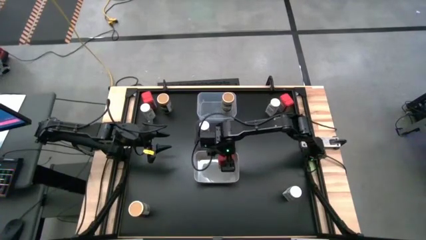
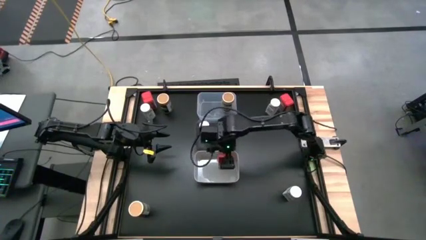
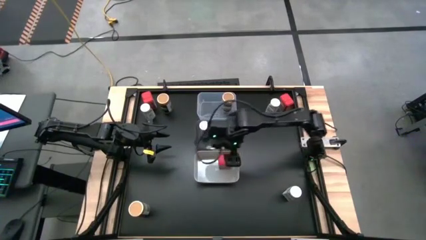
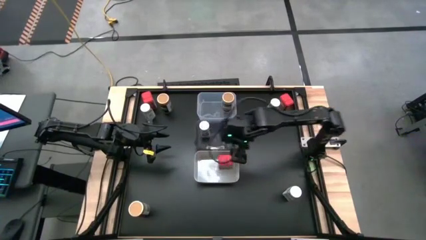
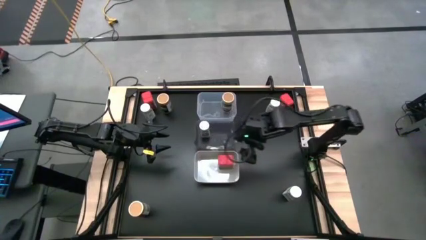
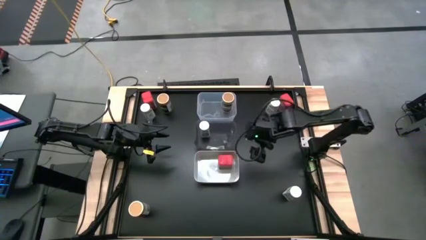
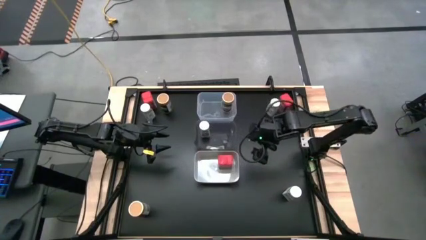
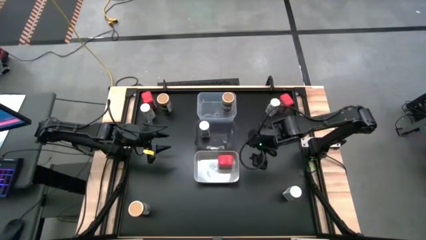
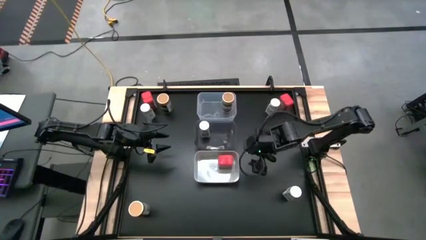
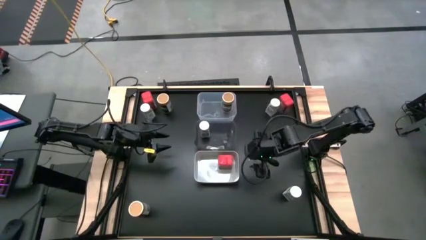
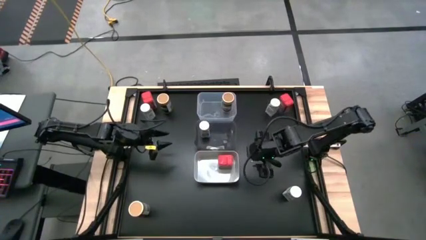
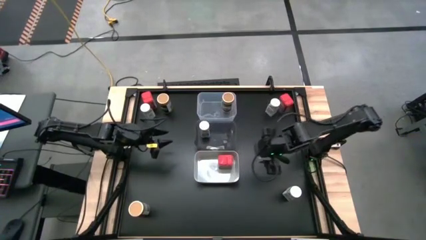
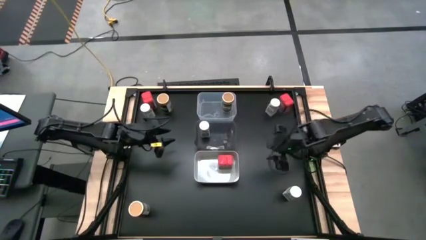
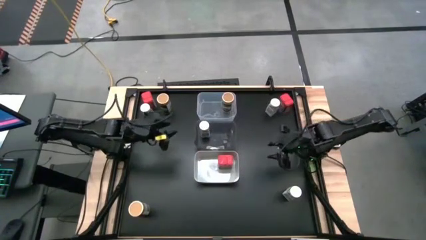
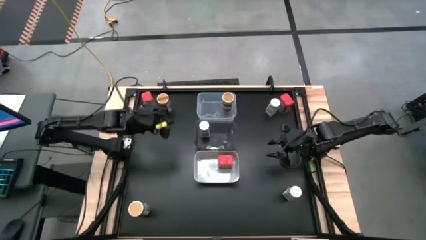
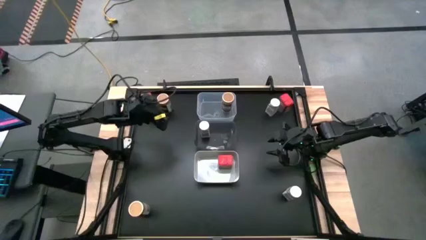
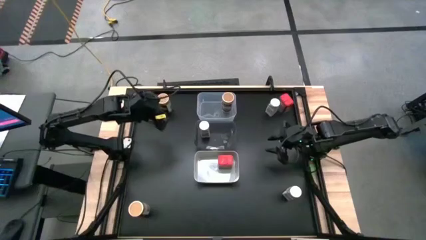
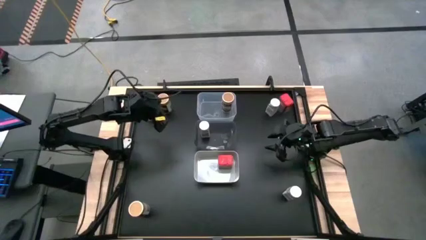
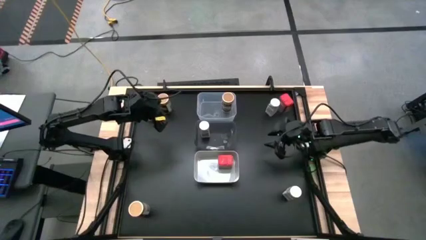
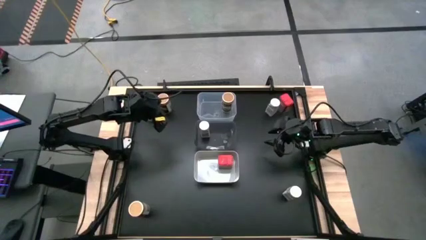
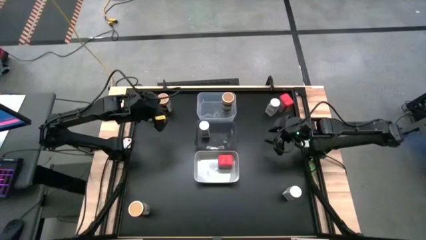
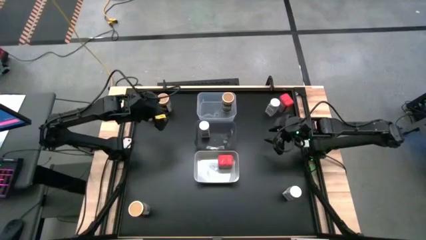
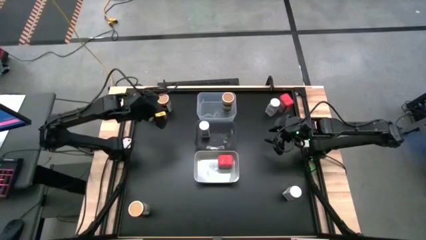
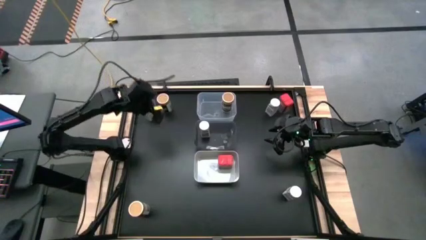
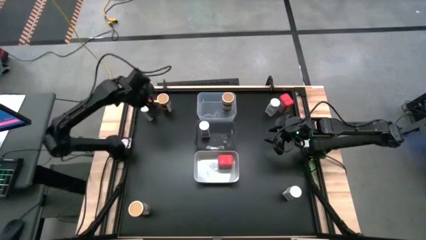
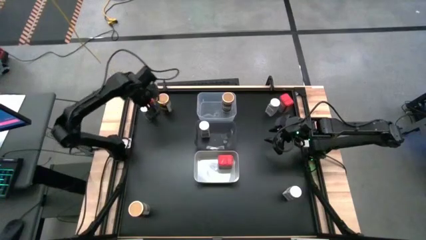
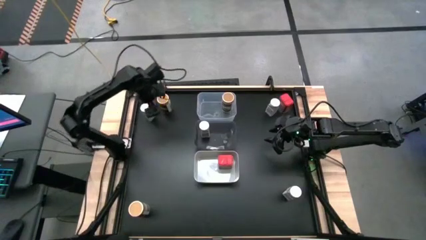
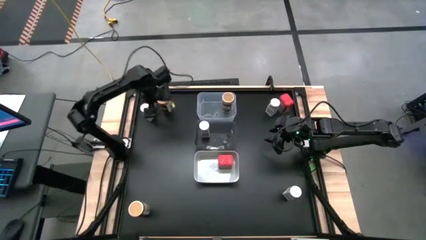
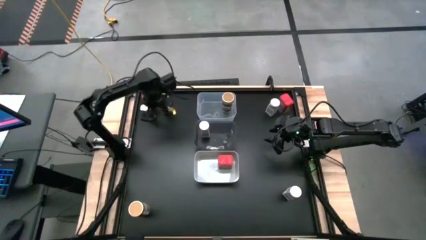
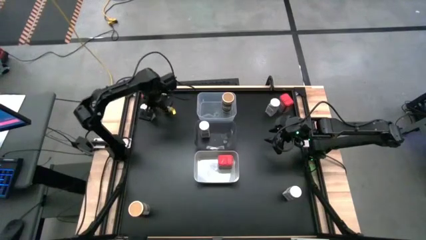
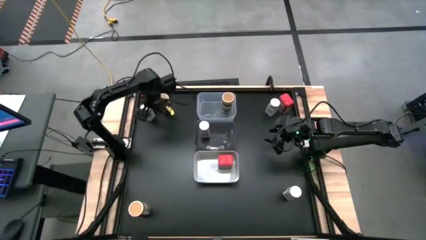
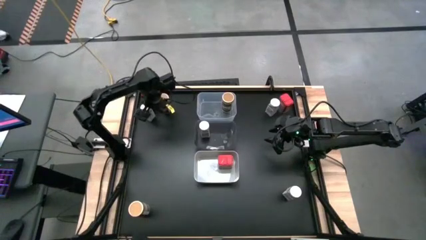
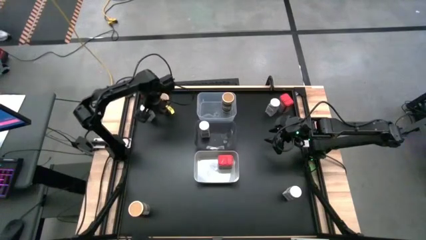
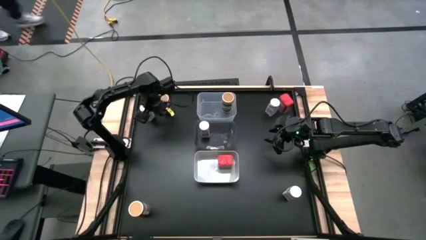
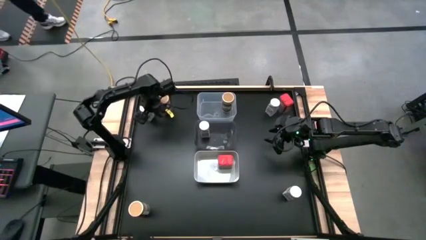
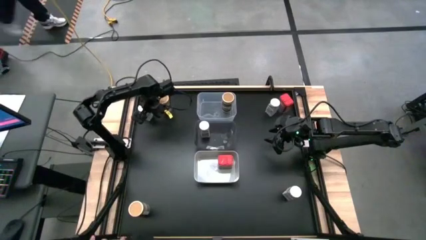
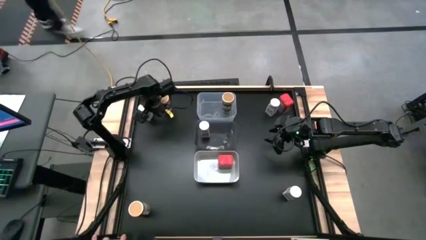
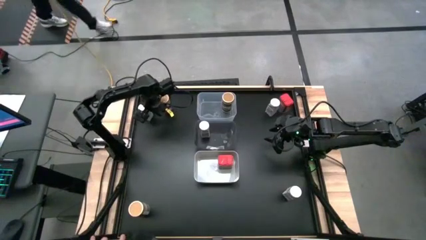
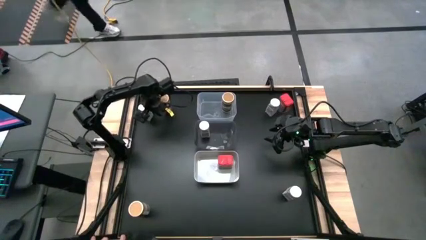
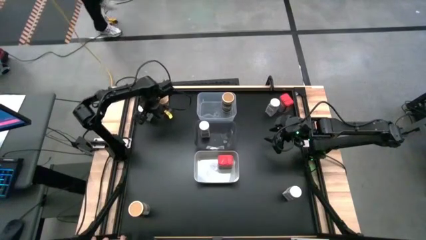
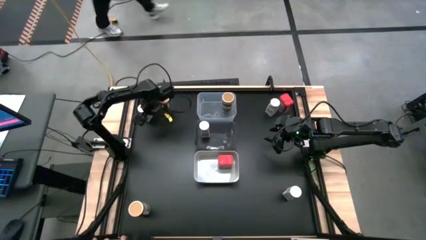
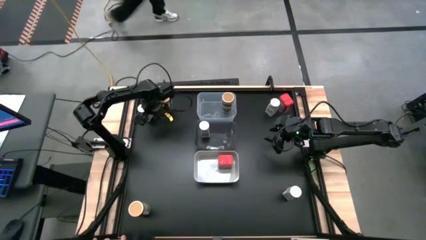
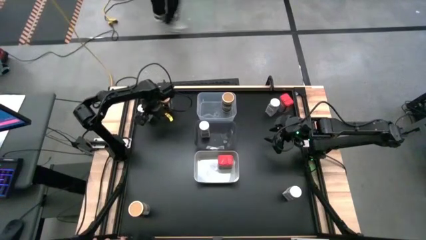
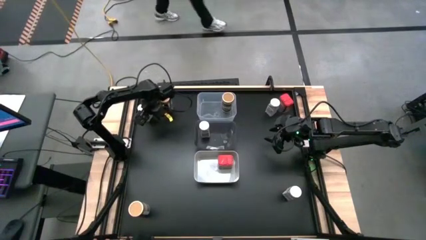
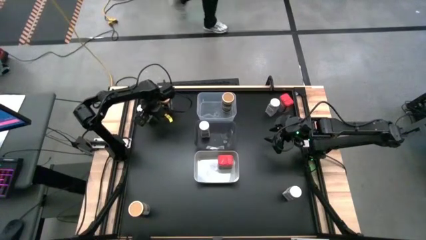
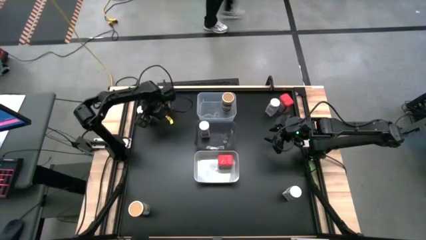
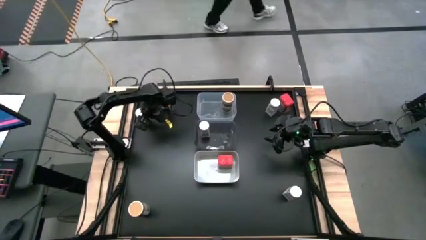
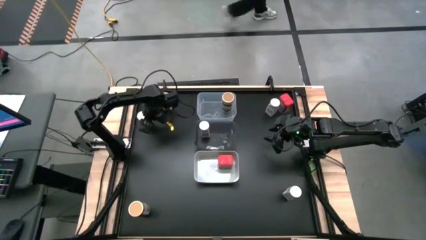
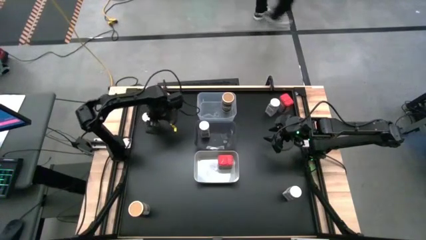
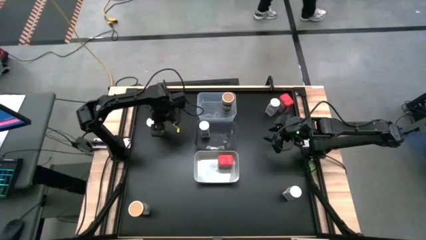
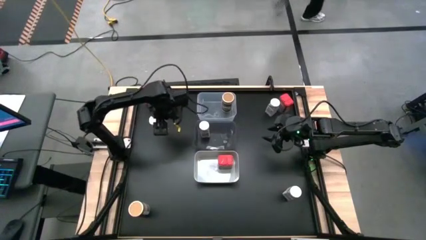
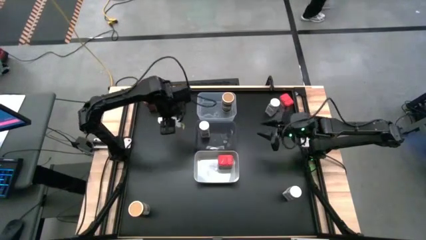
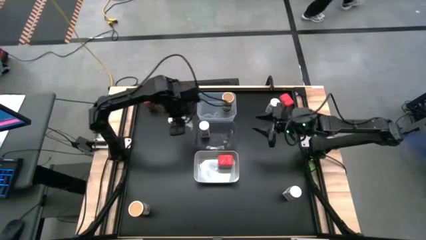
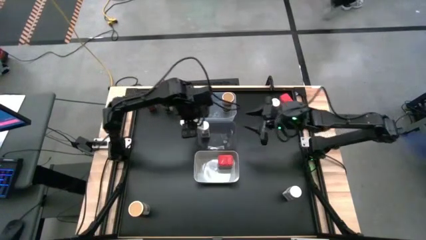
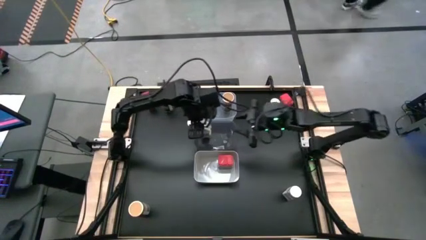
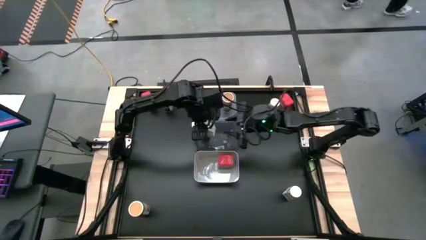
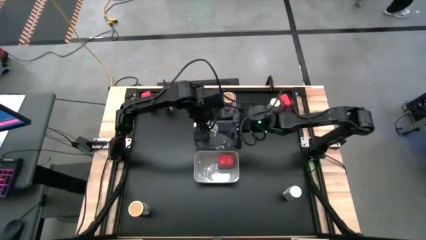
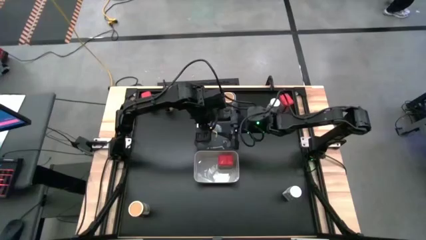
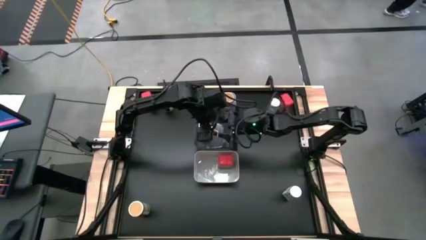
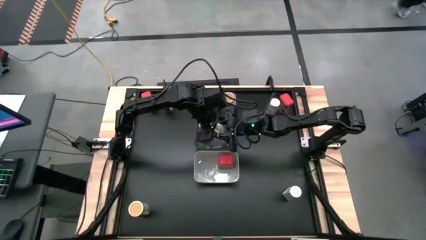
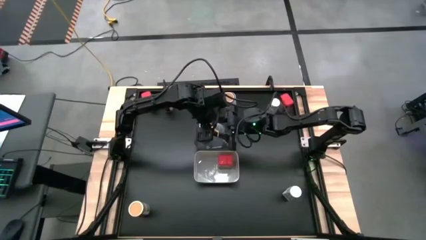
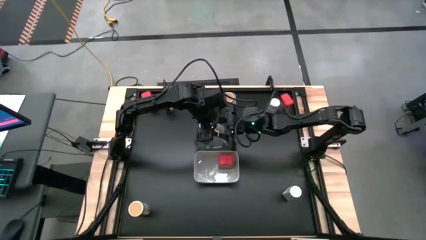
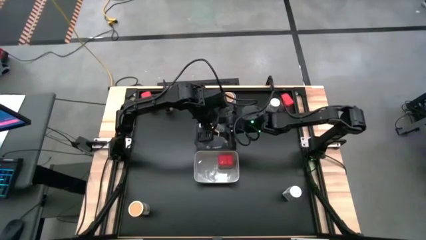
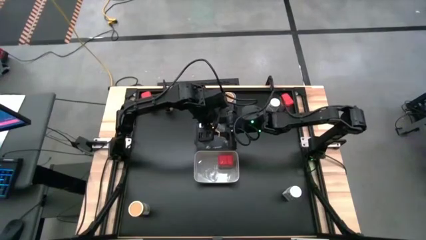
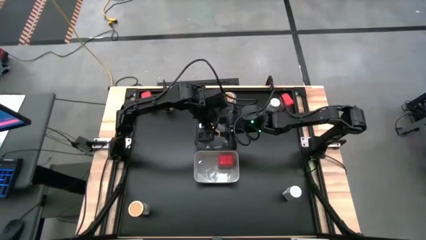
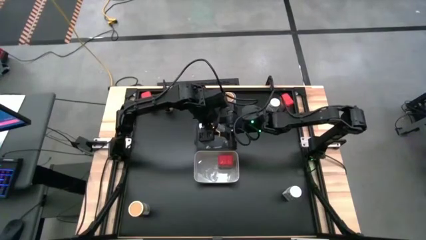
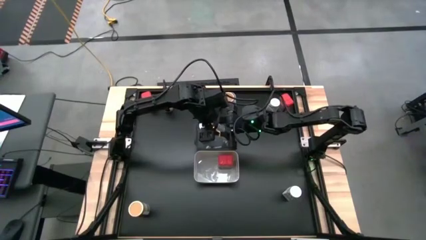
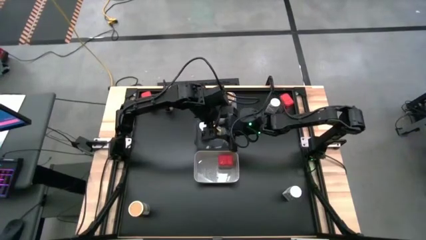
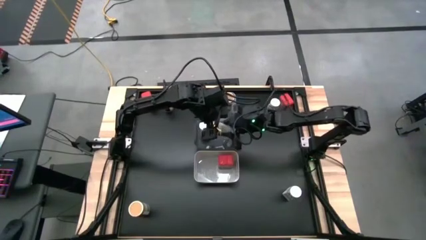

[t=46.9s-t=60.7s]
Task: Sort spices by type
Put the top left white seasoning bottle into the black transparent bin aligned with the other white seasoning bottle
